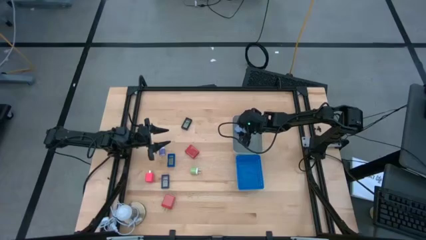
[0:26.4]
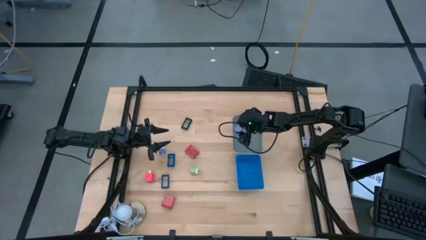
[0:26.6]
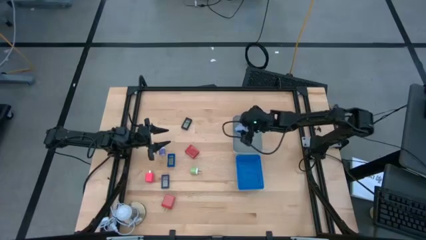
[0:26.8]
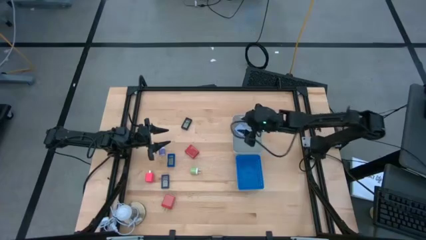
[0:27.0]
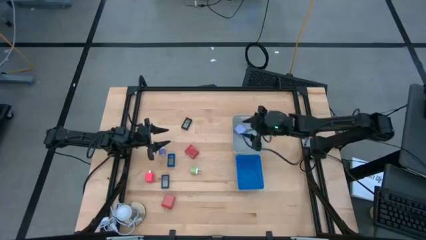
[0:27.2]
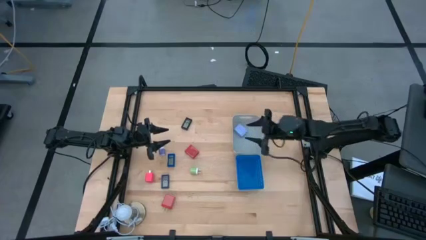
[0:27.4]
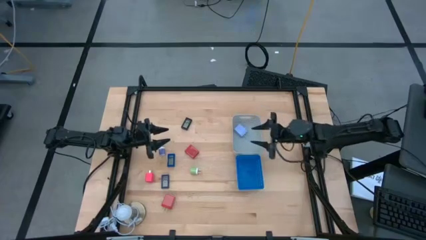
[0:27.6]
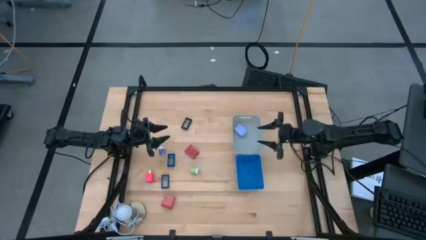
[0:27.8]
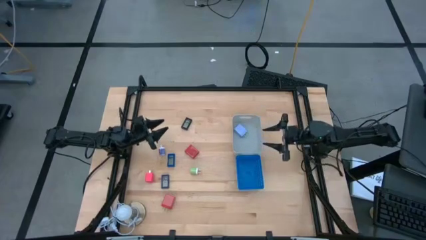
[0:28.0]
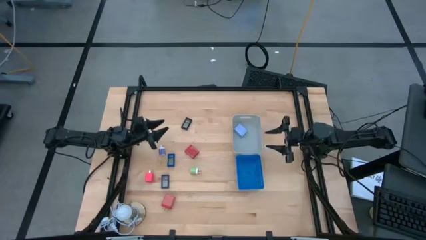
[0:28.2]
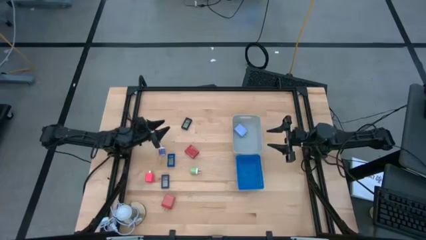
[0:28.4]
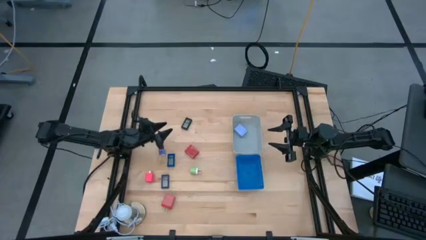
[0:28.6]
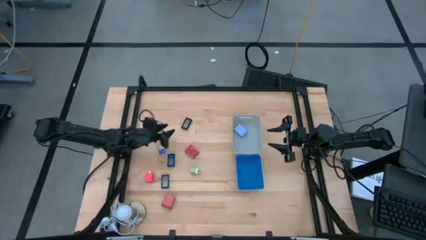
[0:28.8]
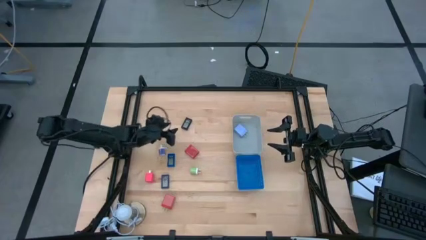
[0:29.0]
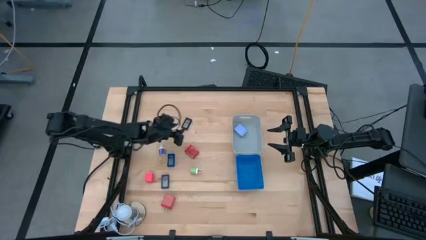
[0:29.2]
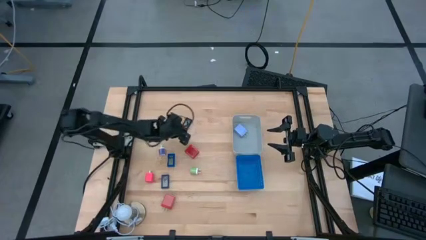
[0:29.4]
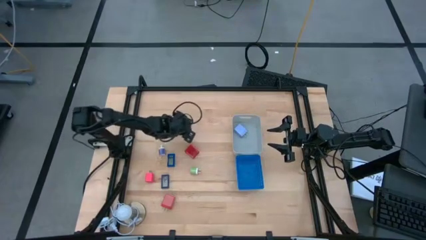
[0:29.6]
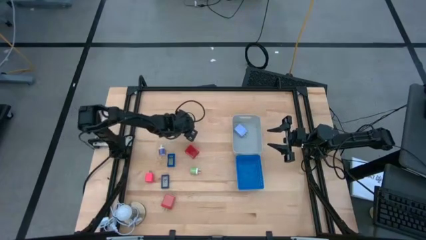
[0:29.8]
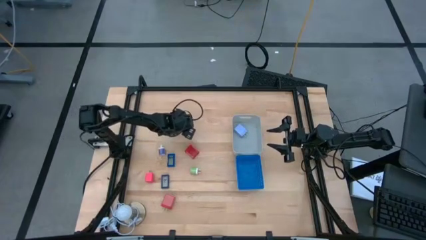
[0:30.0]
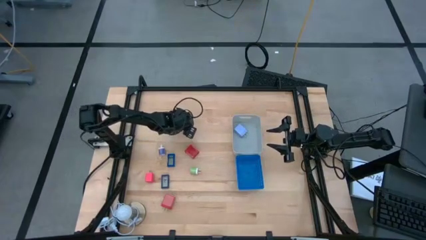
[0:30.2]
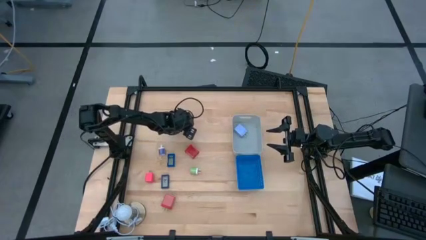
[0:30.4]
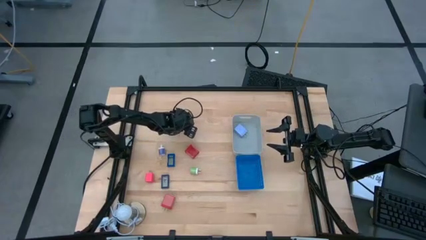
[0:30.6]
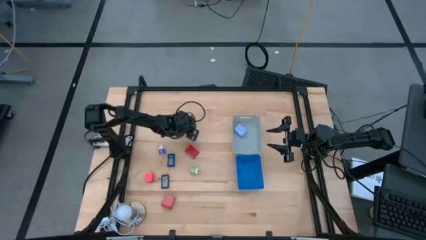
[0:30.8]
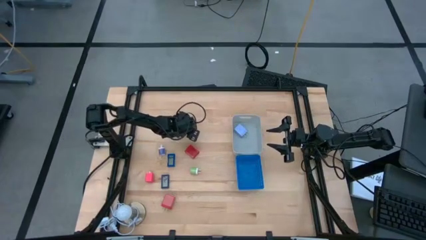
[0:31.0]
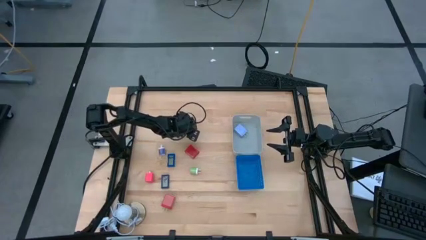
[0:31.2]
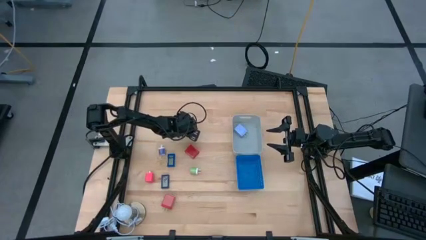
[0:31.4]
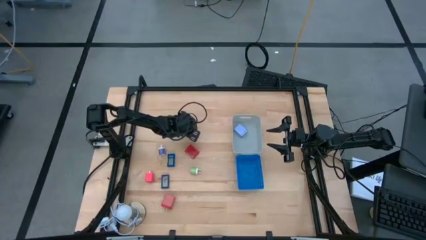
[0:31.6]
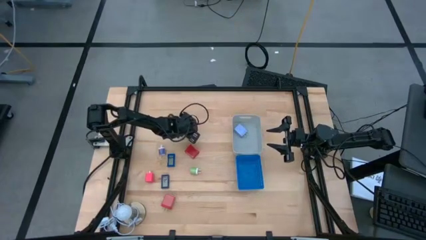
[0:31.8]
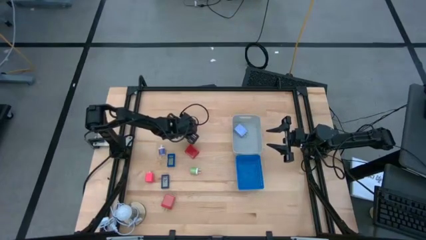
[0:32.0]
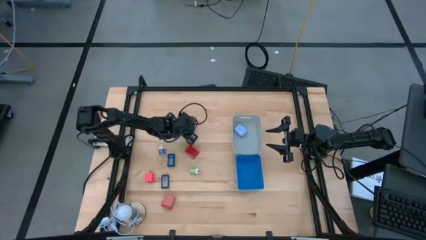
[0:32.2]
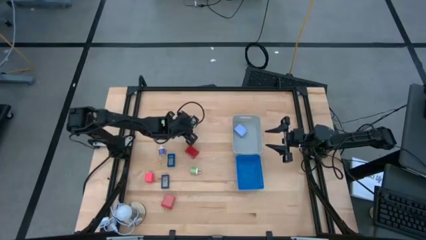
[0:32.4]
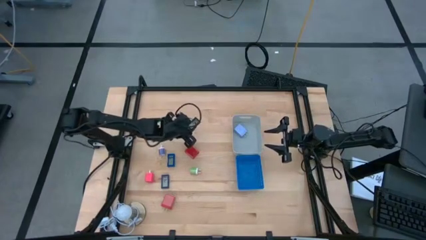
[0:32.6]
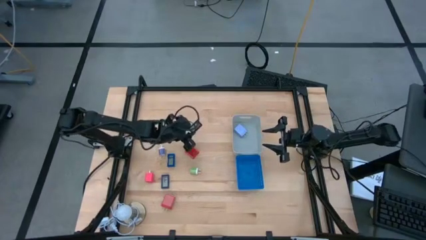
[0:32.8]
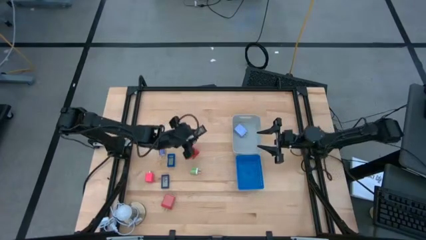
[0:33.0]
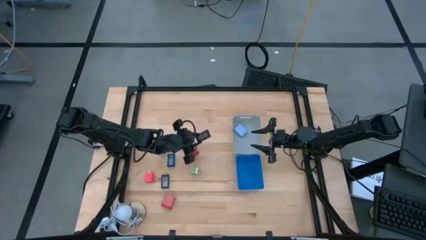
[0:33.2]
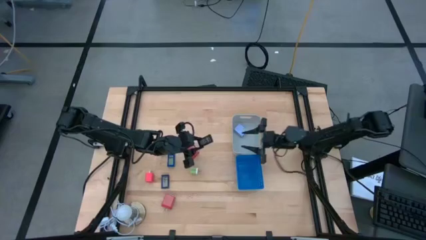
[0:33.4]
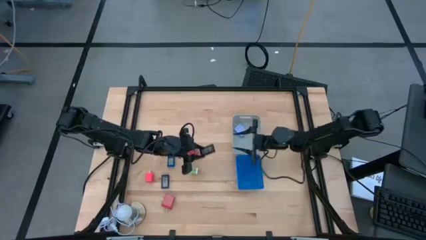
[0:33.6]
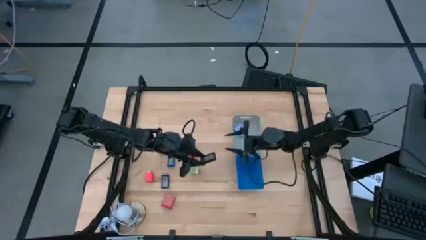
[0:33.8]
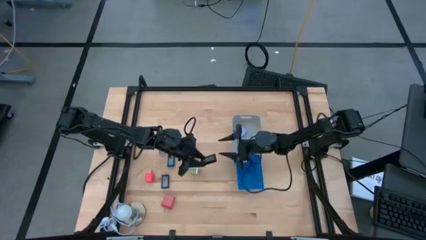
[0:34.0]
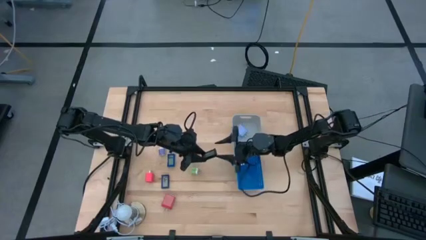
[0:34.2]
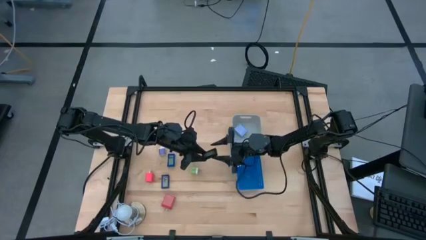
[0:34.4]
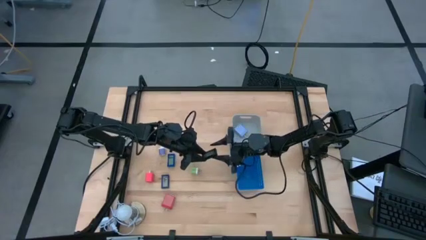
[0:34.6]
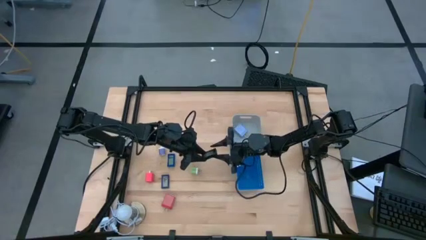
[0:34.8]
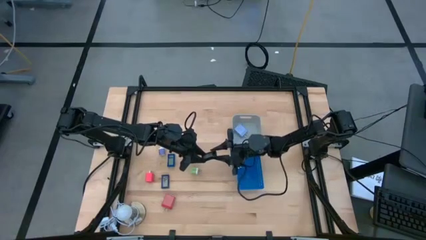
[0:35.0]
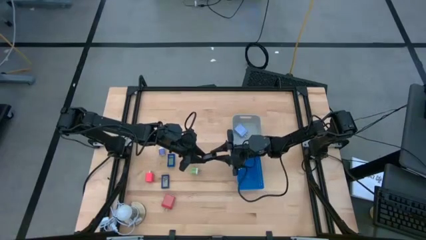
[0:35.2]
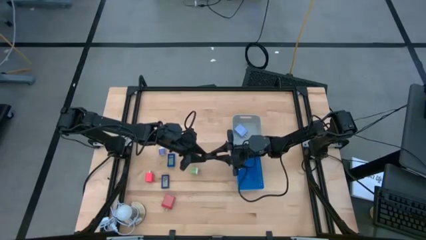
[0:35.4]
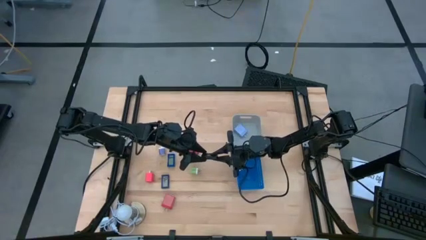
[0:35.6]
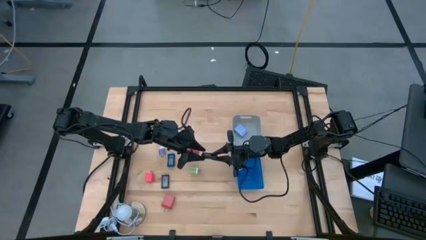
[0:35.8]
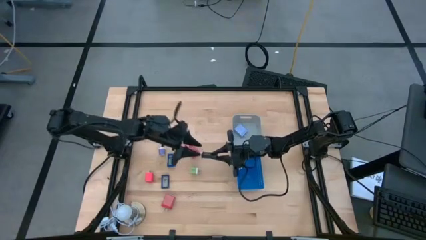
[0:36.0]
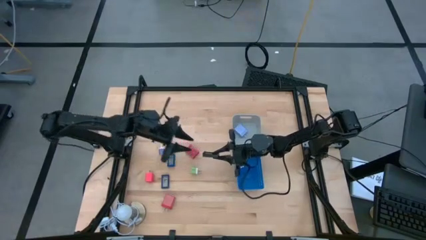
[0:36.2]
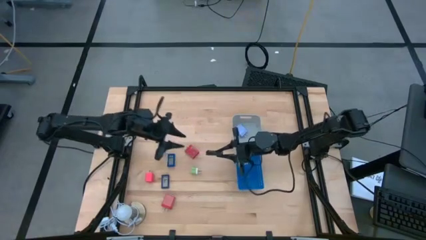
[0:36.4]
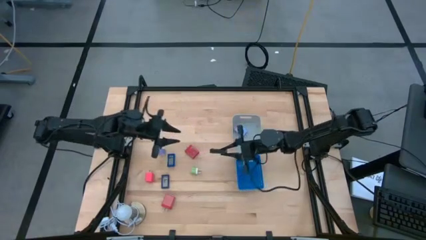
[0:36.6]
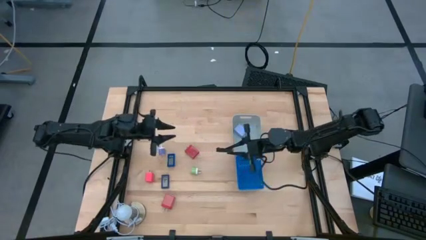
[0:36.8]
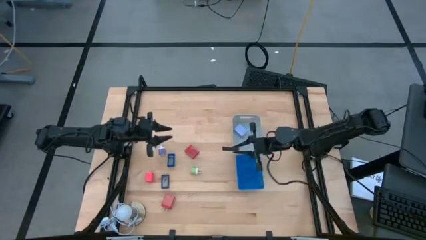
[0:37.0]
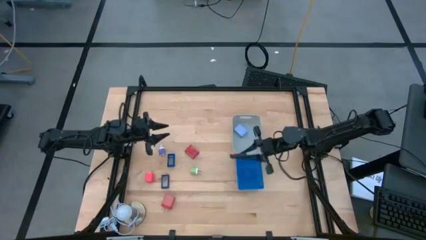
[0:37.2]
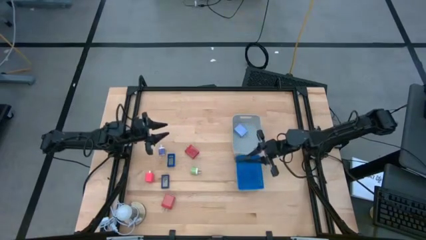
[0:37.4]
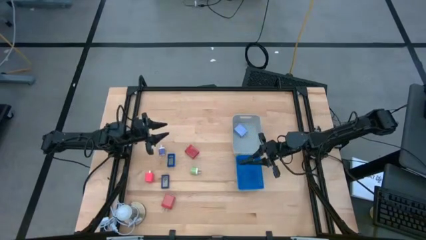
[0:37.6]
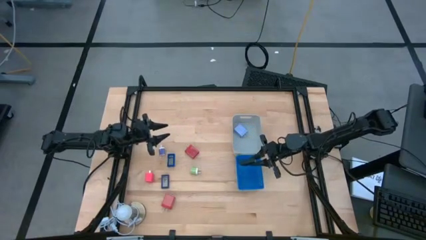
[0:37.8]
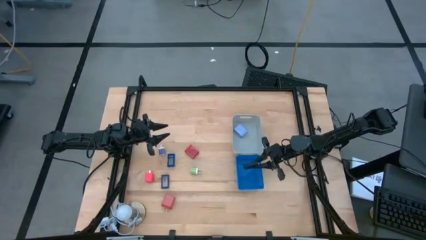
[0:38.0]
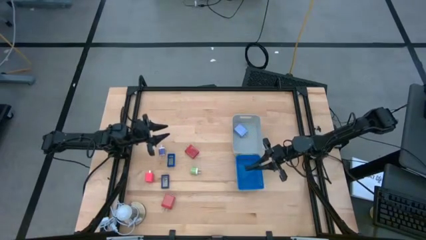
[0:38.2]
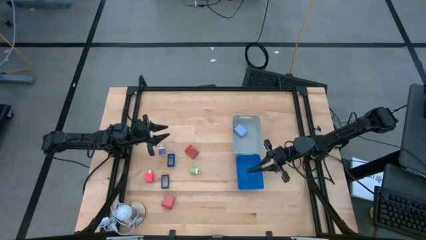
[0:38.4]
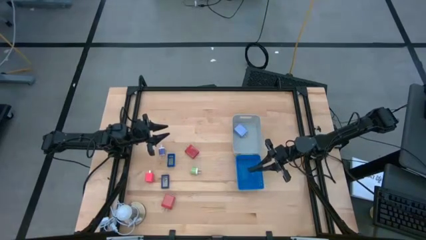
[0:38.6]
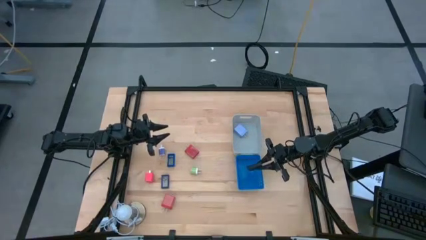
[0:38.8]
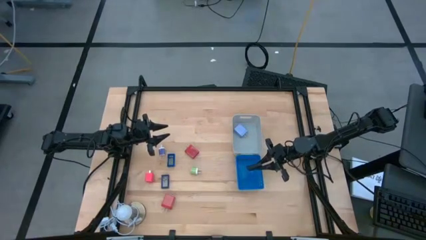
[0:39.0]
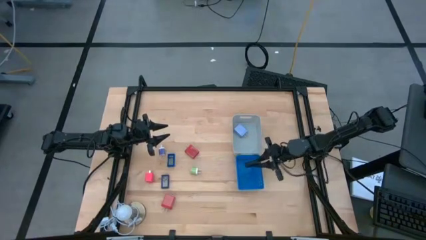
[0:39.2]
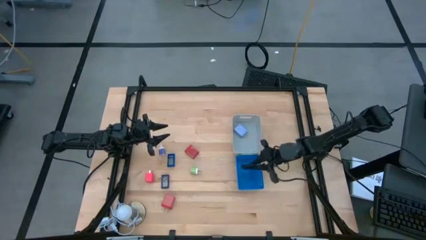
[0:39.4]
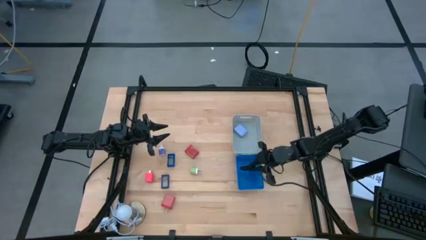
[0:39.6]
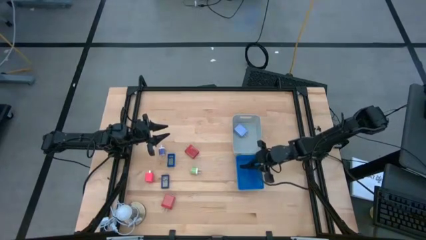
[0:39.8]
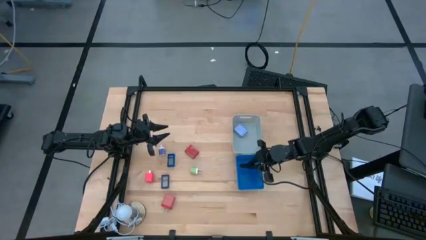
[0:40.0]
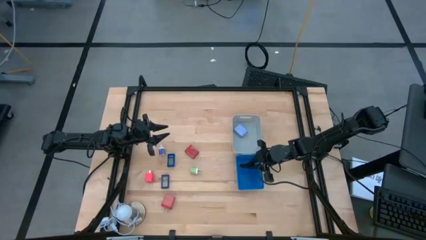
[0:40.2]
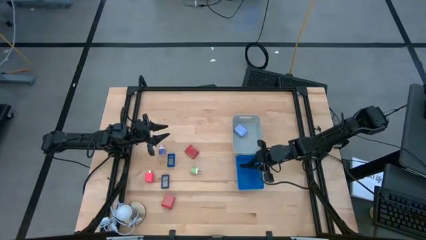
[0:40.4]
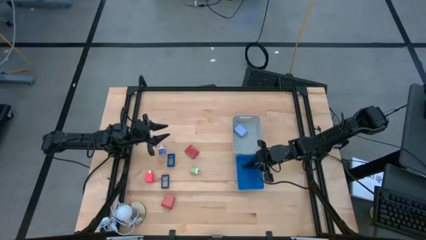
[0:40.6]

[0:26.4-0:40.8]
Task: Pick & Place Office items
Put the black digital clock into the blue bin

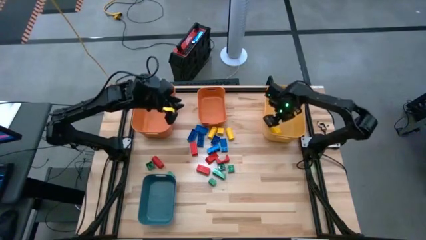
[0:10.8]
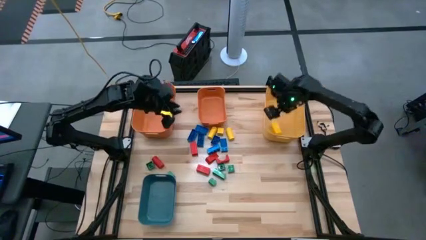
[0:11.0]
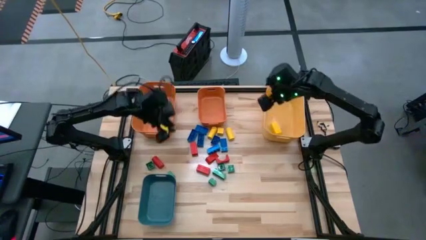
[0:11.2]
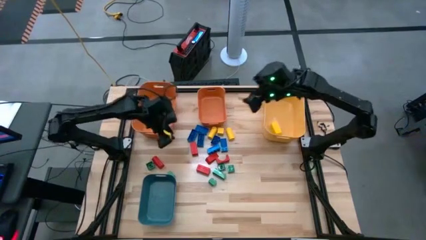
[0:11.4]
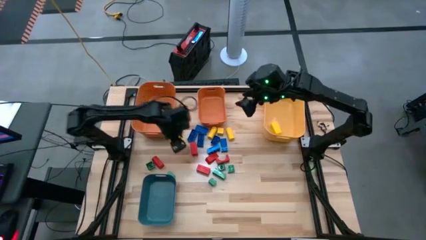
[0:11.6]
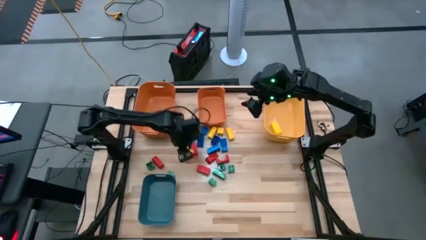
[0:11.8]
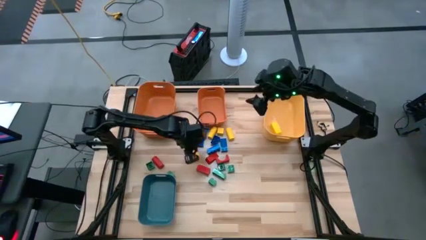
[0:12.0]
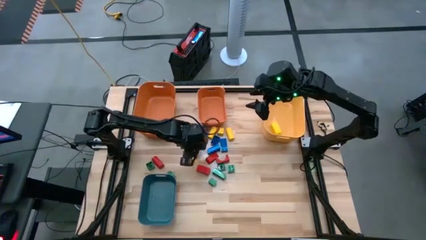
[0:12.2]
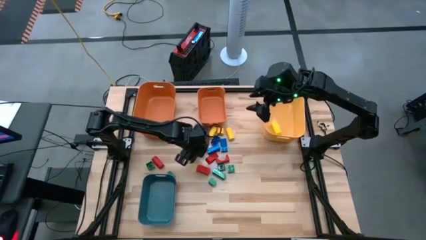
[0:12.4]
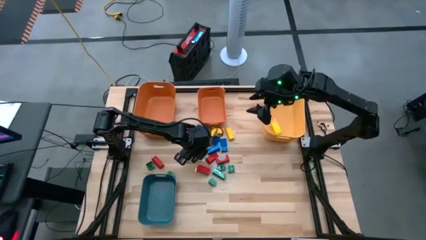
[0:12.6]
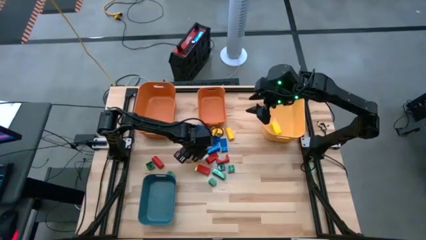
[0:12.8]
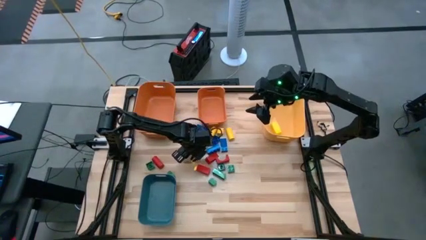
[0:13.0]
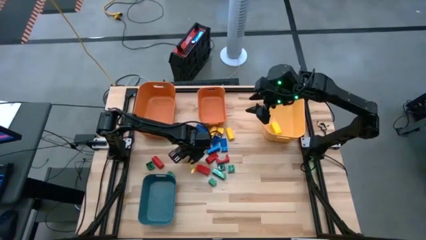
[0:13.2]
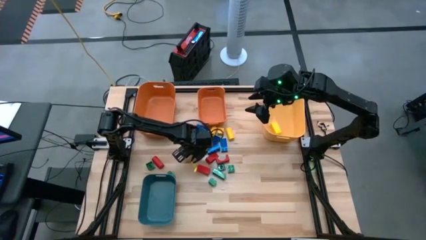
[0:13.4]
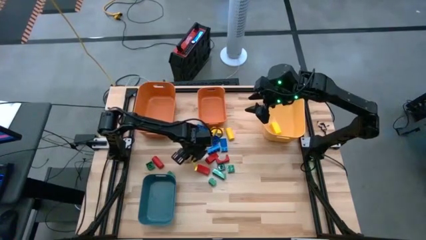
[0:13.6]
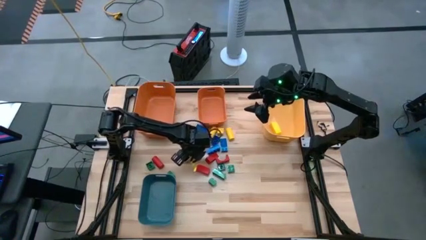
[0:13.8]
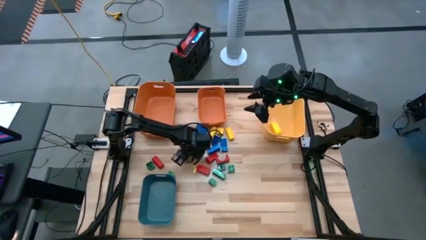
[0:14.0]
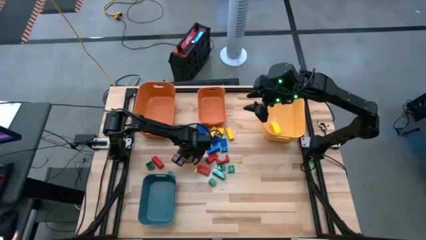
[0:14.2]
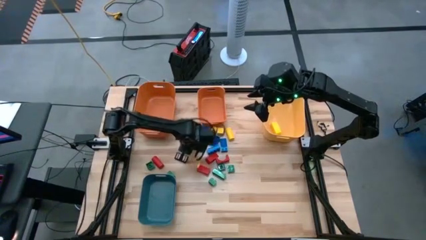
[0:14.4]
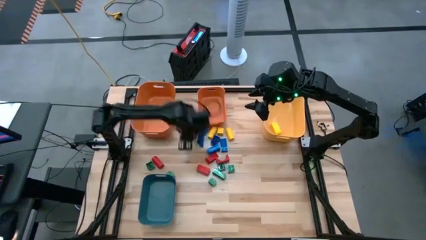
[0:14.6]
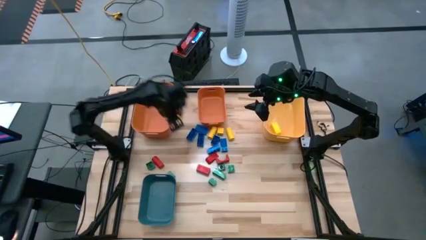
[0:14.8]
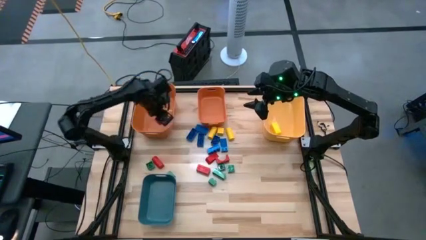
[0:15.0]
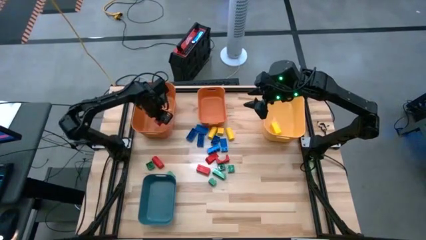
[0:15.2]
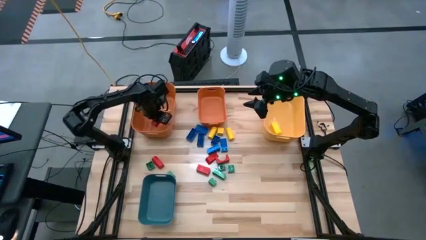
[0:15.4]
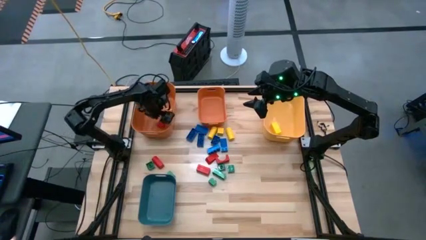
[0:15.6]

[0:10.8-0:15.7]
Task: Sort blocks
Put the red block into the left orange bin
